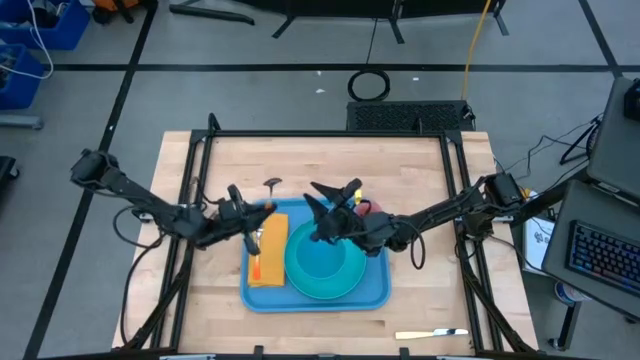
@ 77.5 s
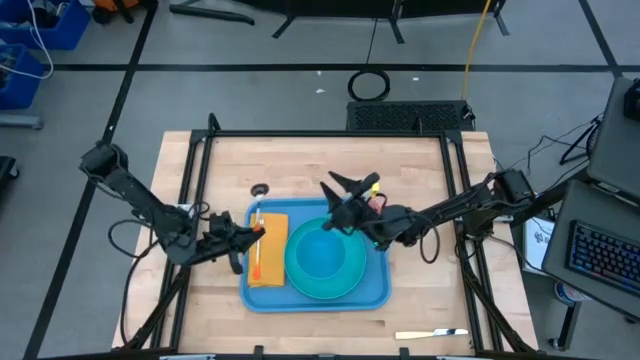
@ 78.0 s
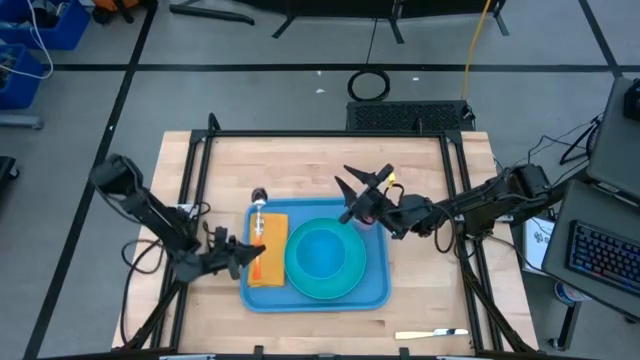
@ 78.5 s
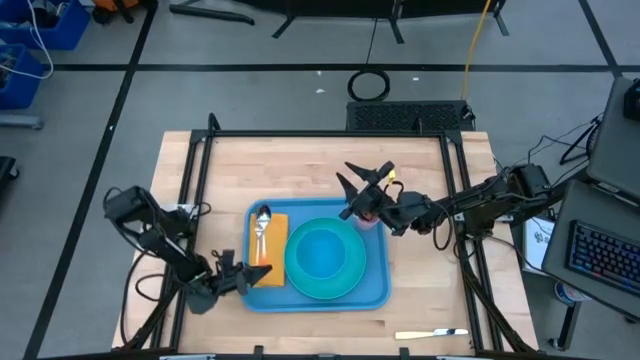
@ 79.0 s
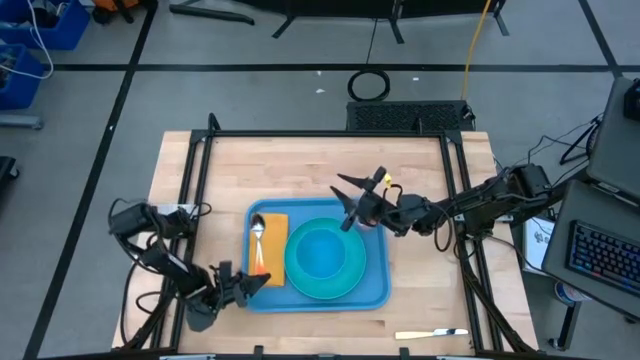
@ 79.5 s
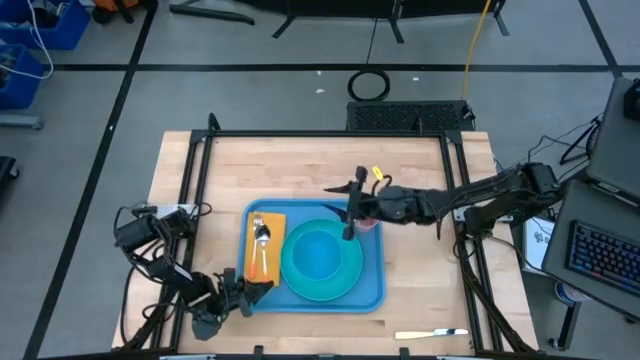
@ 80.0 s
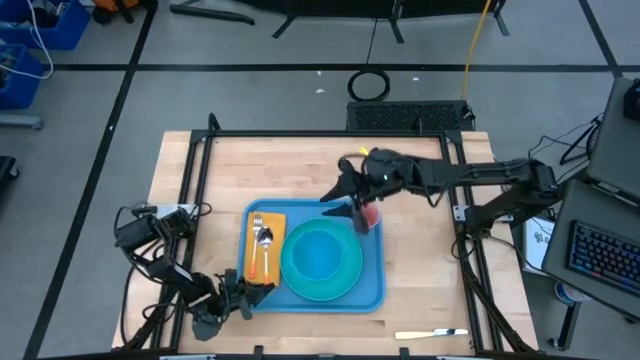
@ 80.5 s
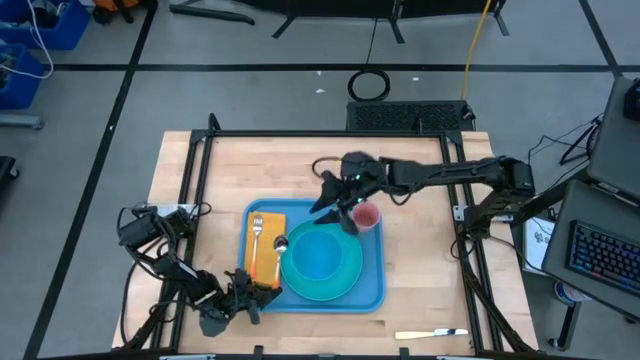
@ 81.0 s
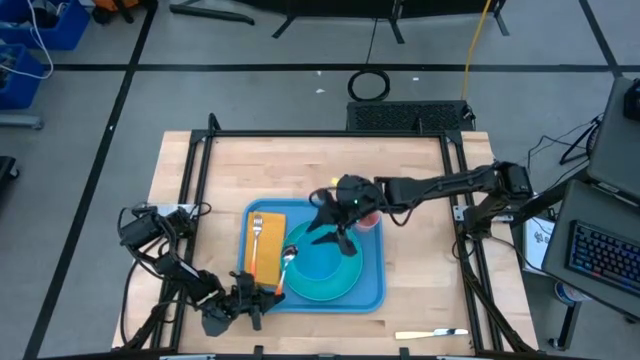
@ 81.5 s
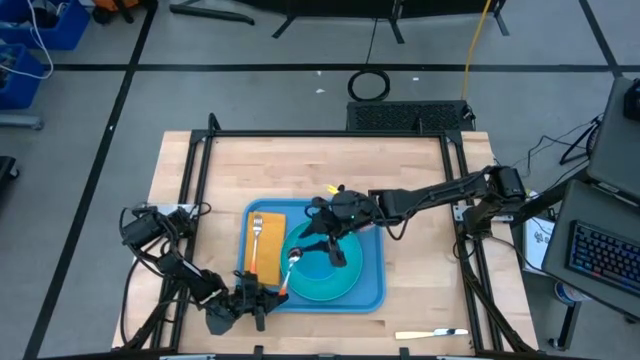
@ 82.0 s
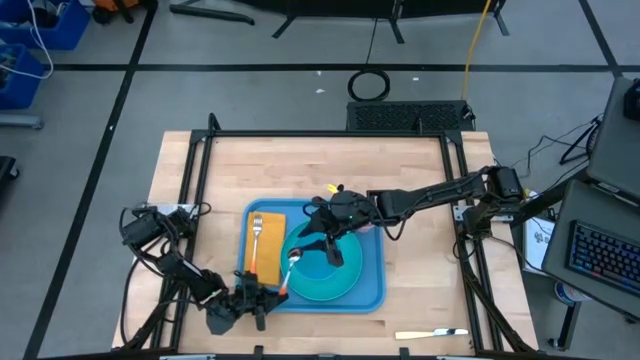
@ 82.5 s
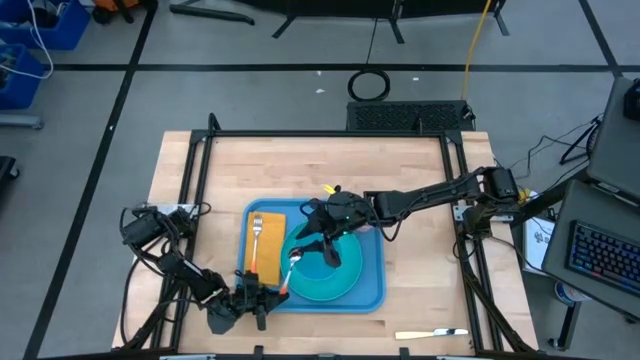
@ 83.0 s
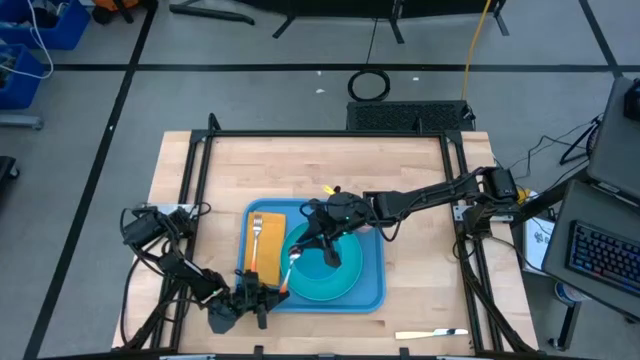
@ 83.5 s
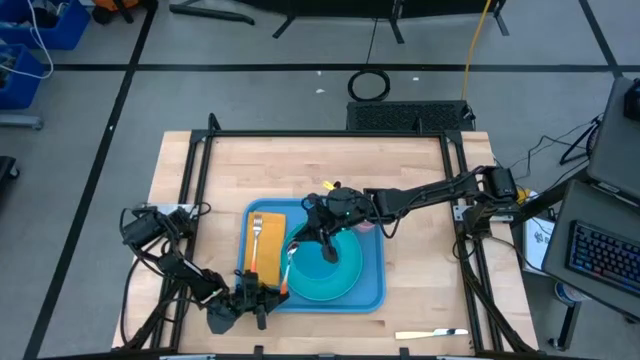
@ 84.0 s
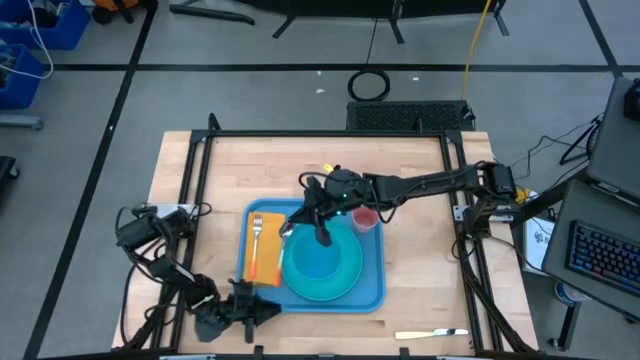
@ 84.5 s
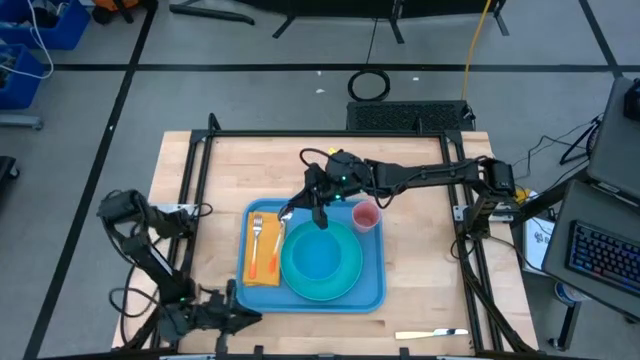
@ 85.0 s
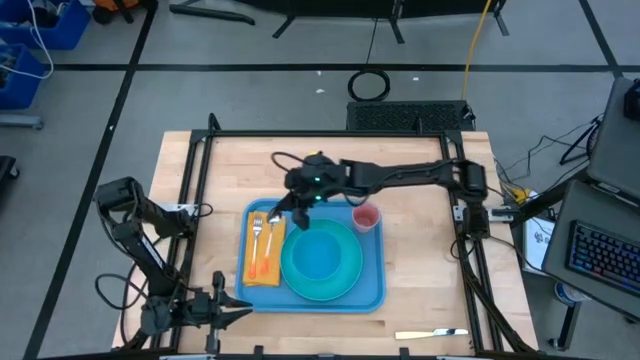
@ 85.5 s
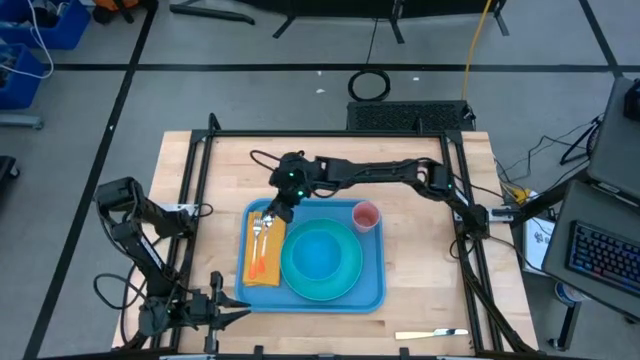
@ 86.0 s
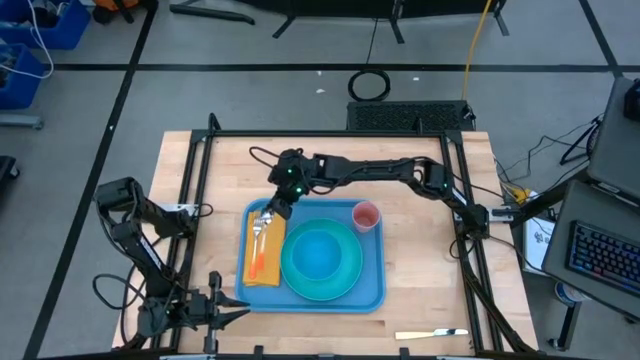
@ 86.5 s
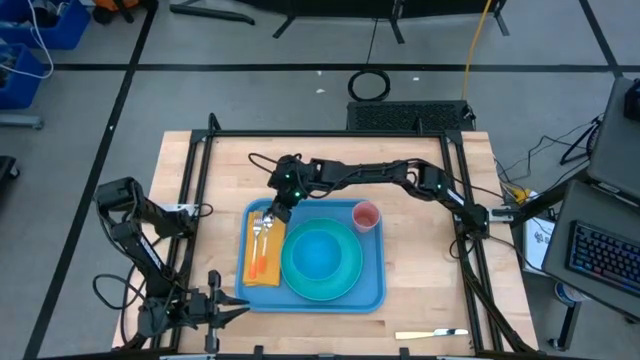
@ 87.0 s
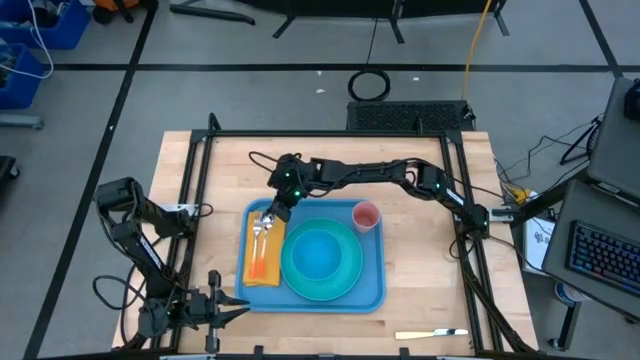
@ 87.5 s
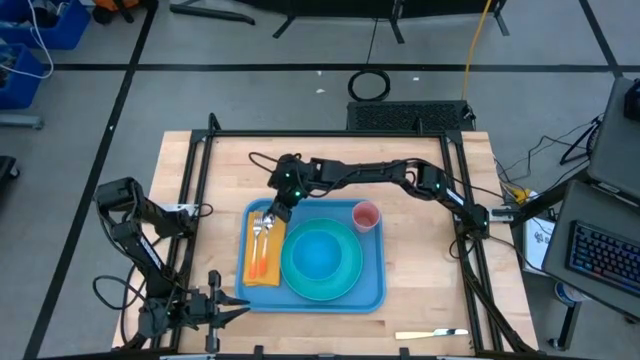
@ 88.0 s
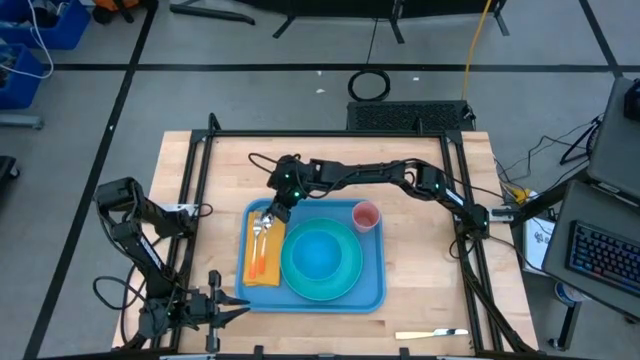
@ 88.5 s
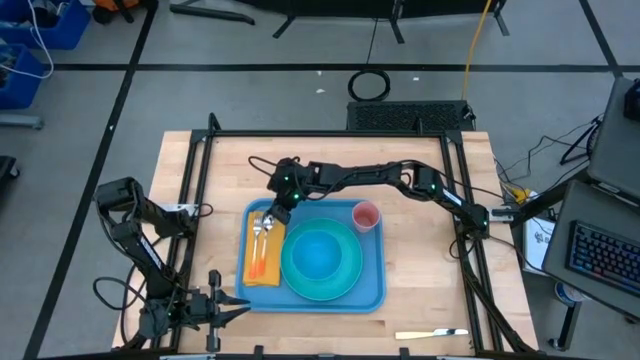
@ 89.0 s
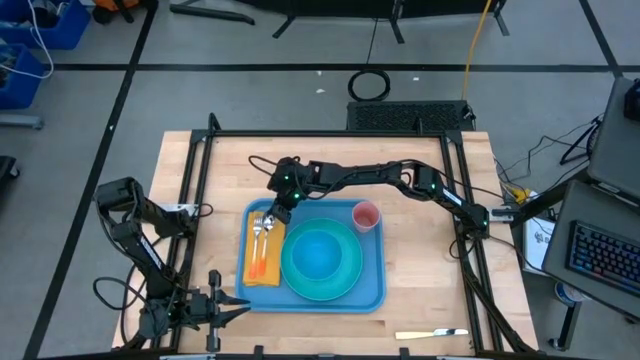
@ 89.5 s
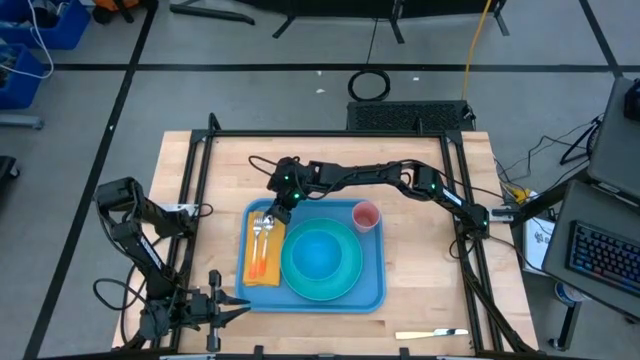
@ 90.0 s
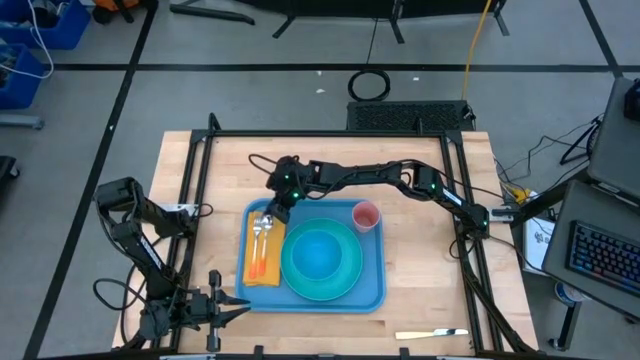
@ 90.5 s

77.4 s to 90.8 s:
Task: Set up tray
Put the spoon on top of the yellow napkin beside the fork

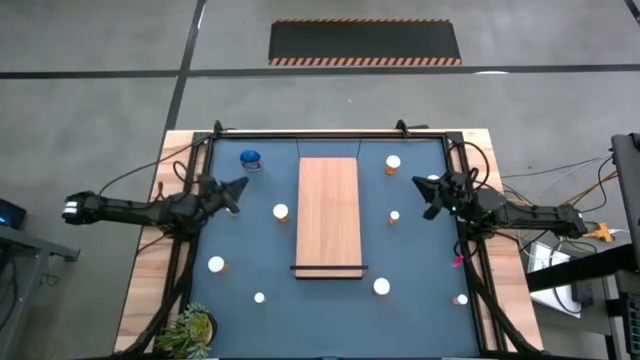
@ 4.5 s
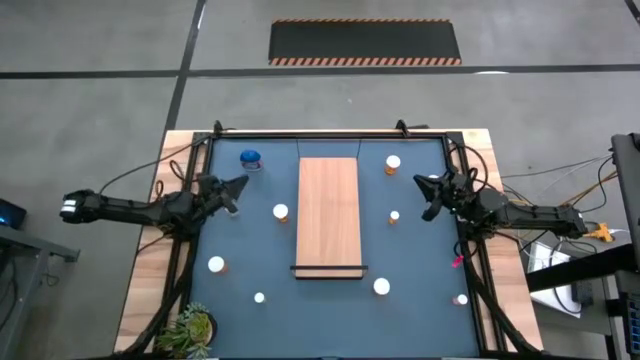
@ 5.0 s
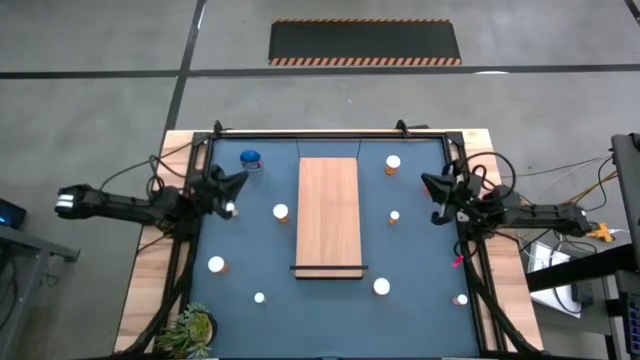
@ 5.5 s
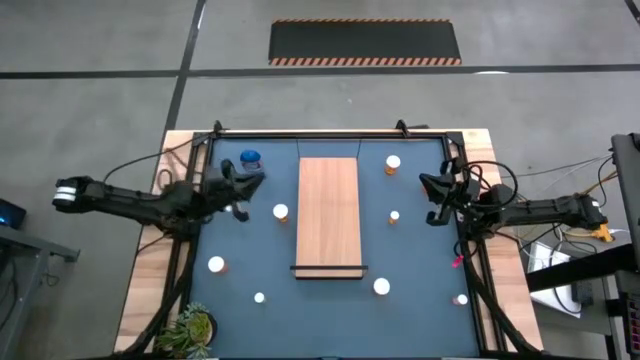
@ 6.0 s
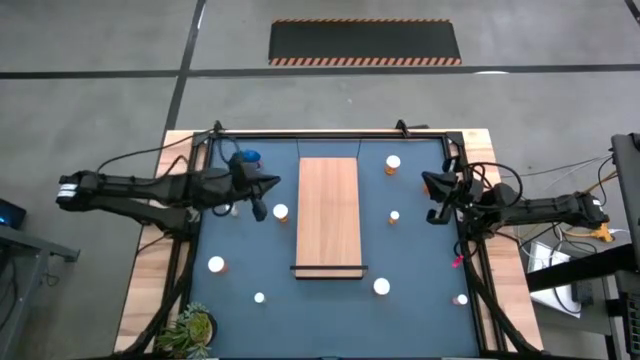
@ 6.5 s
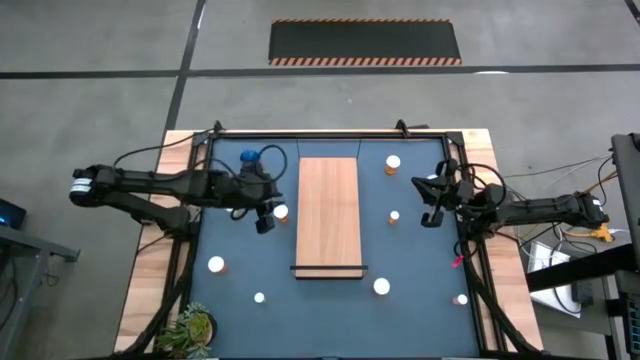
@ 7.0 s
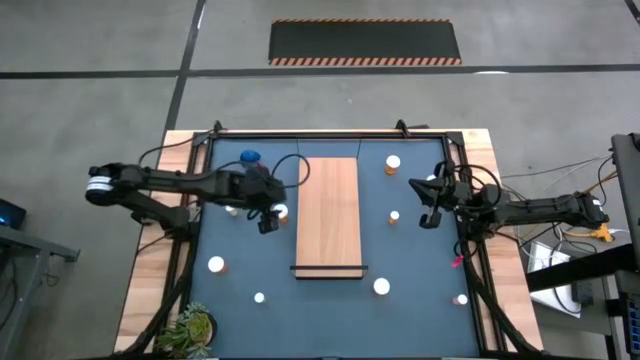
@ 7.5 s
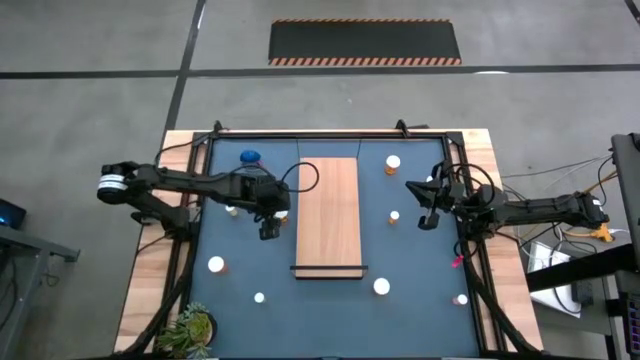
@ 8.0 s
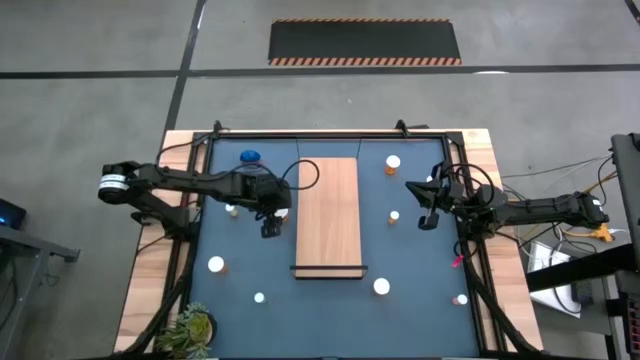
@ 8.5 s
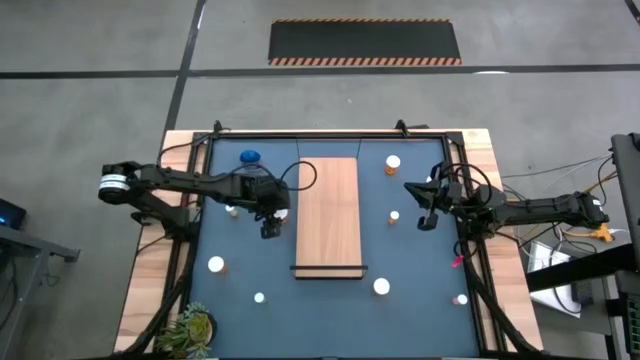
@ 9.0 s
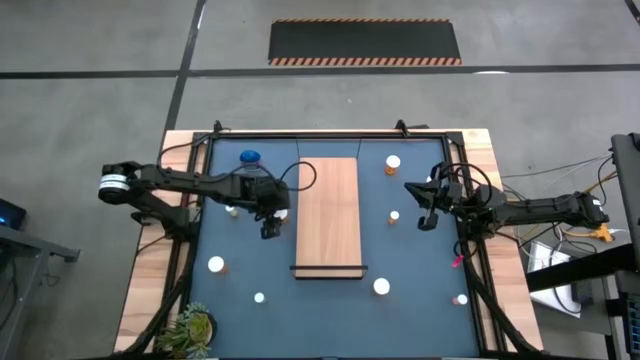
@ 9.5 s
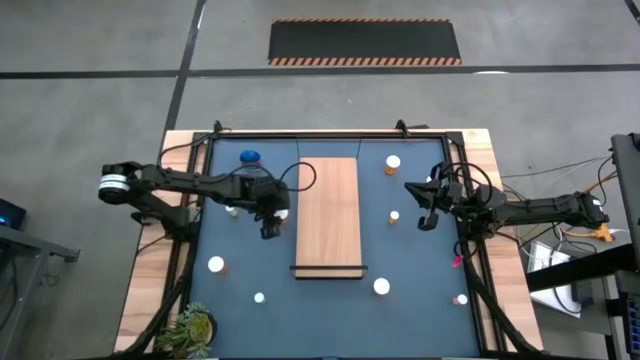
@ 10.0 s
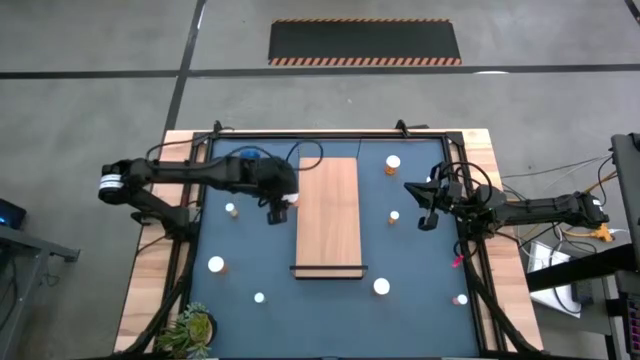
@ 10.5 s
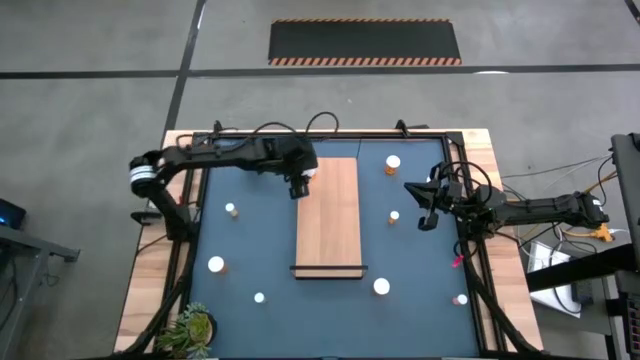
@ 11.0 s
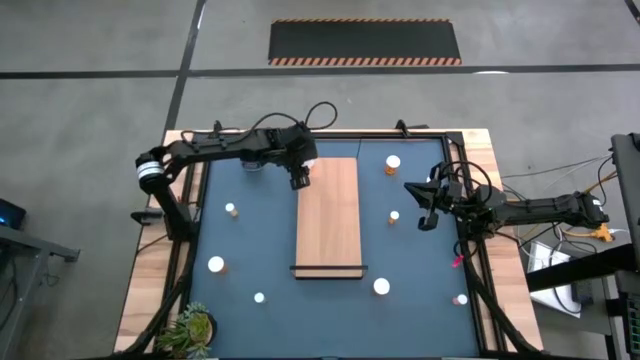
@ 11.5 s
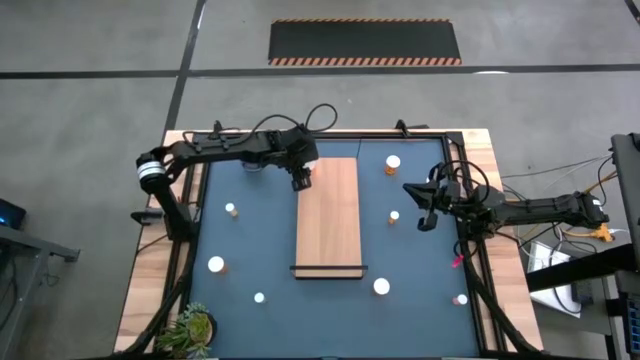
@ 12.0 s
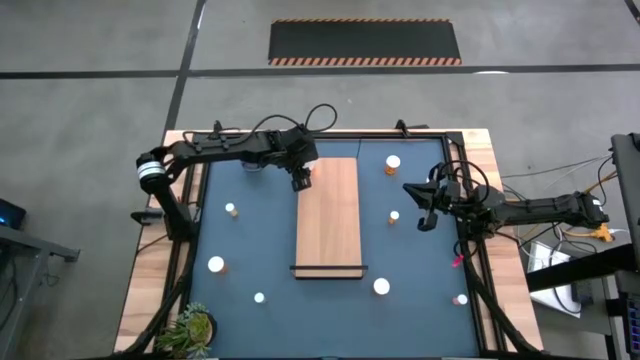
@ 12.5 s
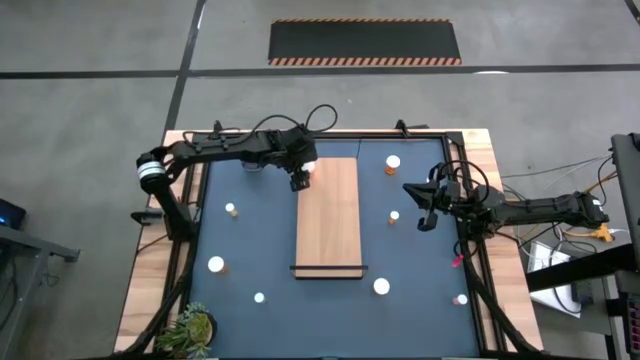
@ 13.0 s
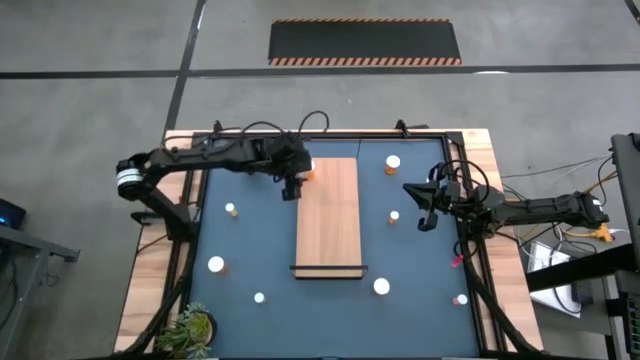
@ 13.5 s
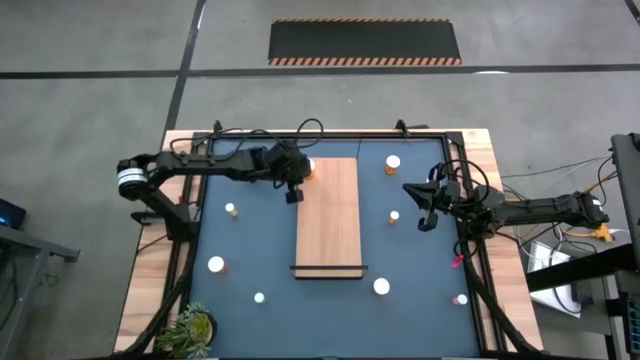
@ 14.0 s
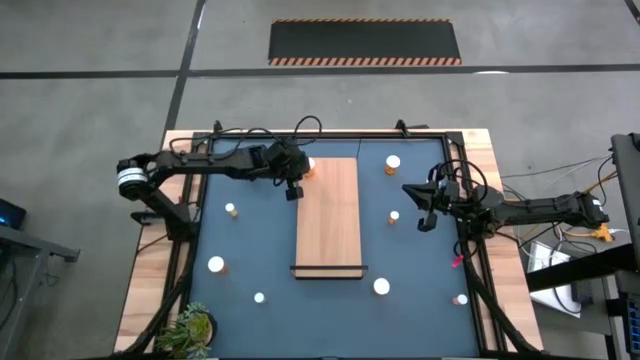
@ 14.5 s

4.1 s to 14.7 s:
Task: Pick and place medicine bottles onto shelf by color
Put the big orange pill bottle on the shelf
